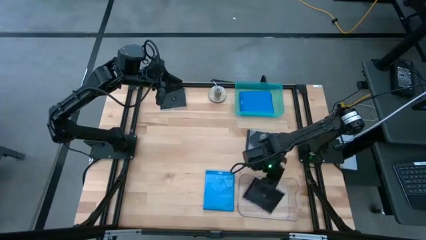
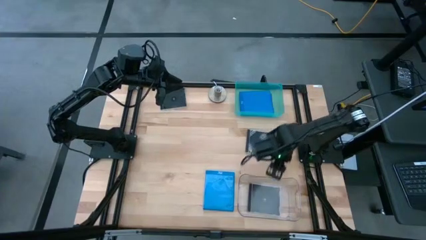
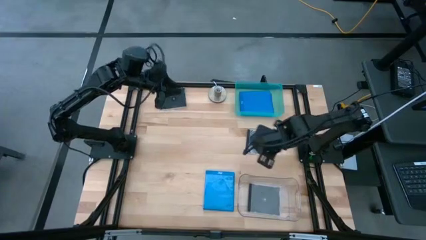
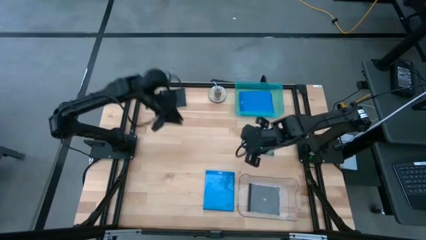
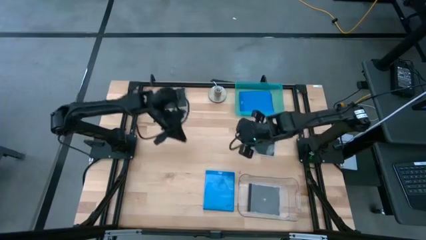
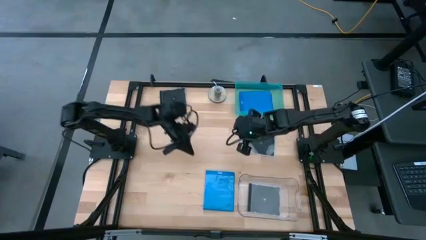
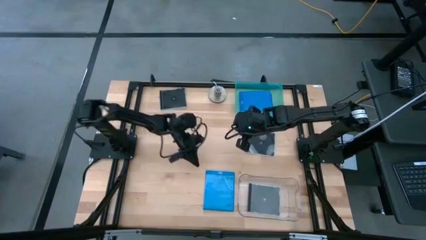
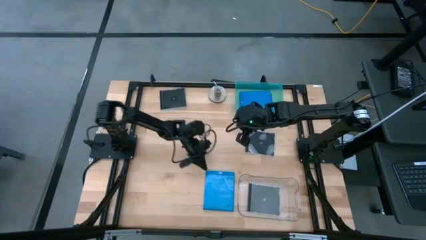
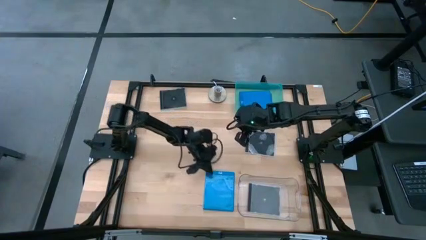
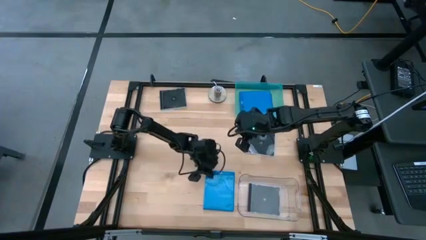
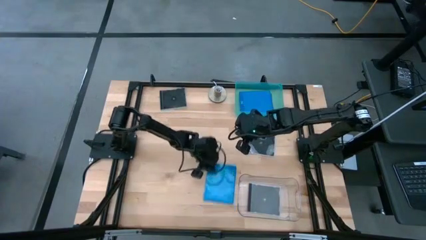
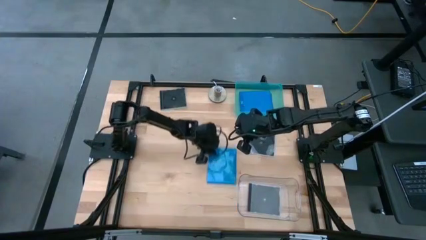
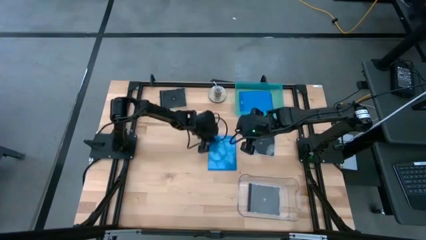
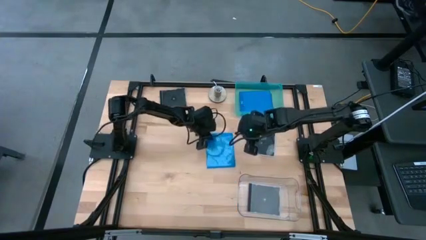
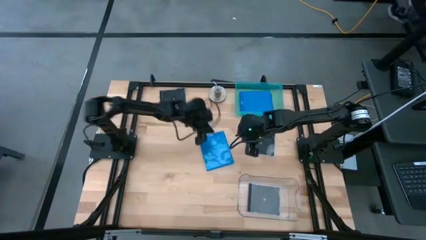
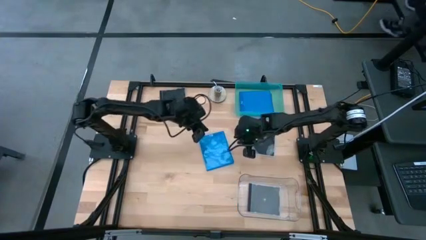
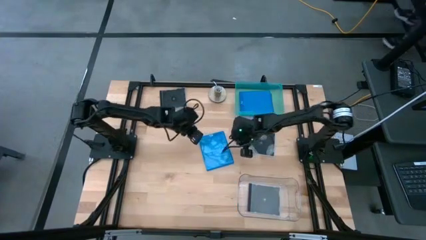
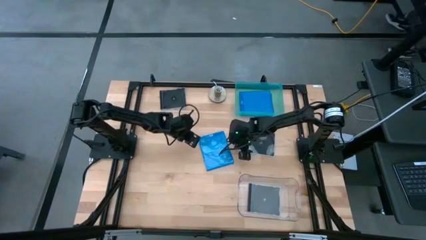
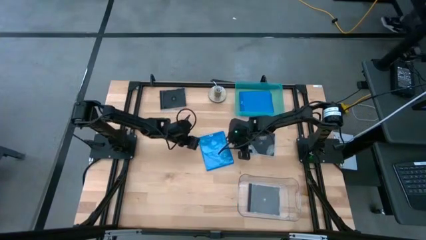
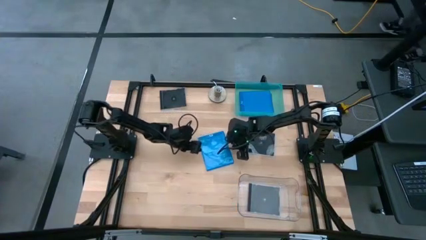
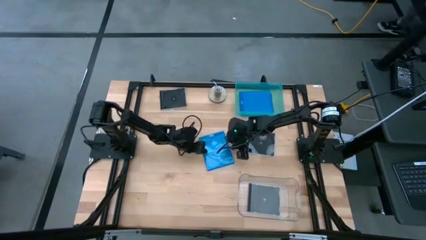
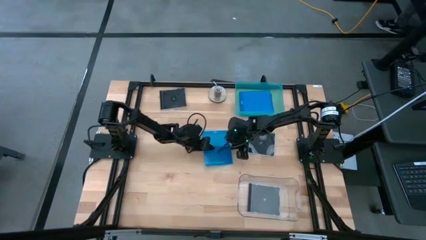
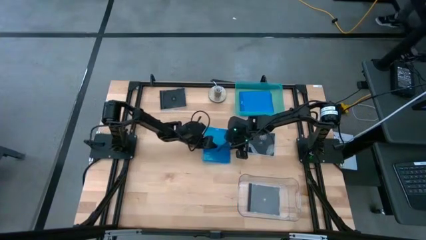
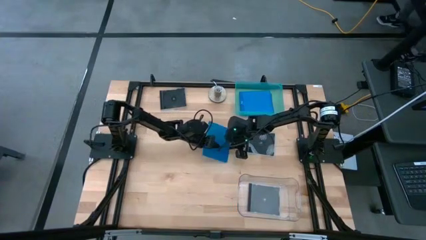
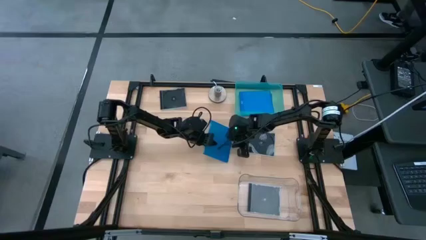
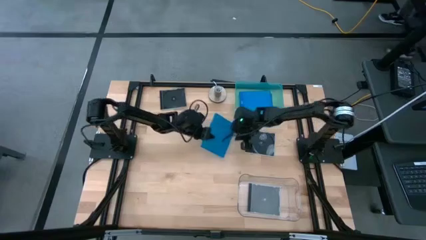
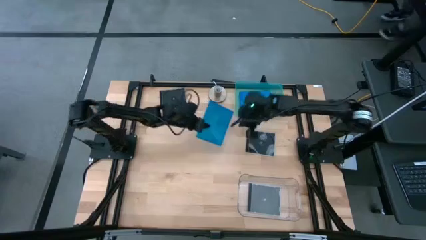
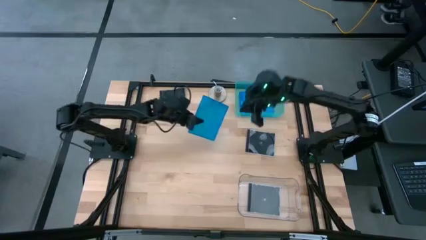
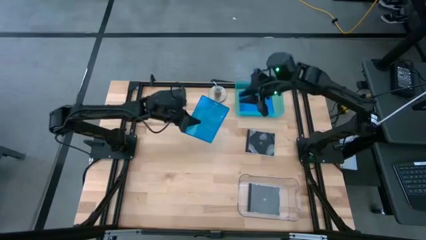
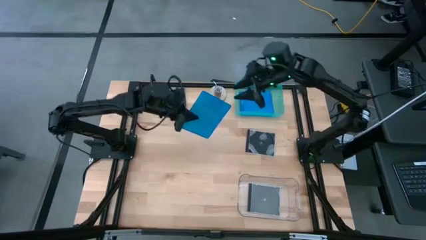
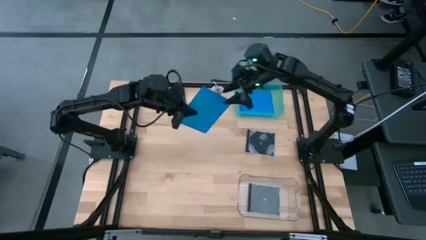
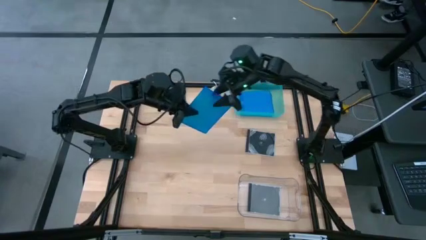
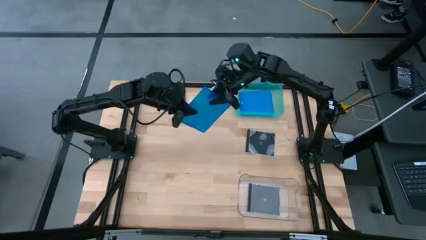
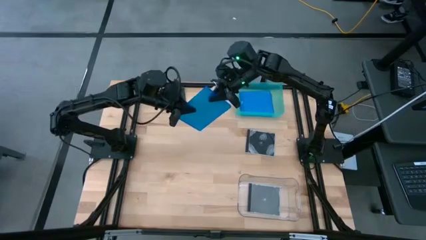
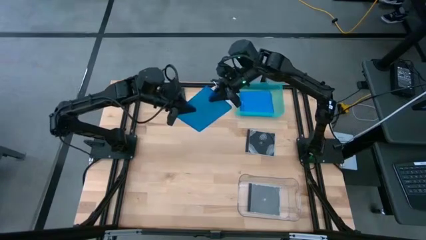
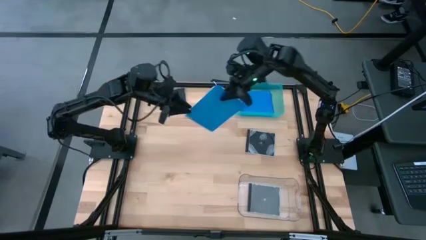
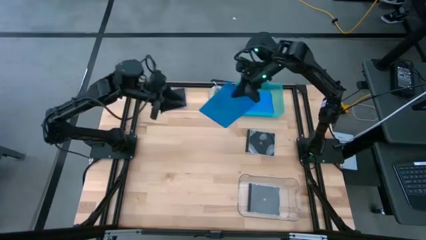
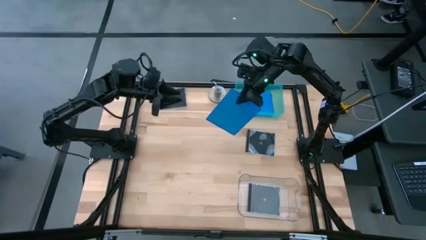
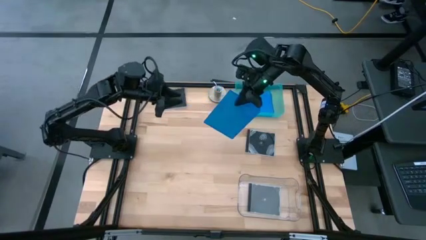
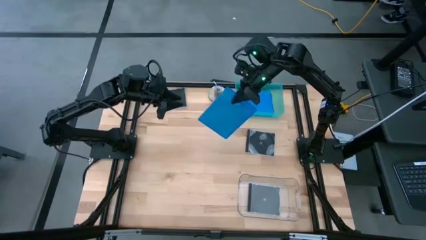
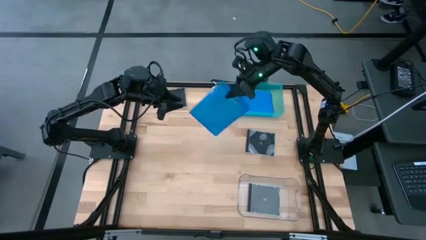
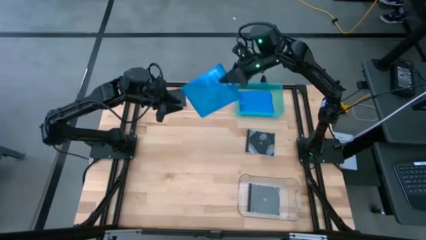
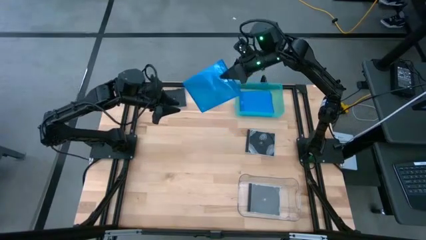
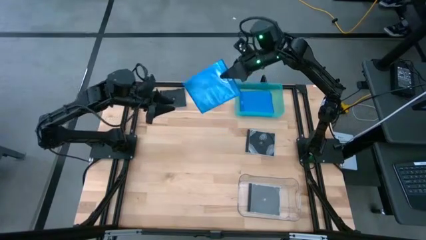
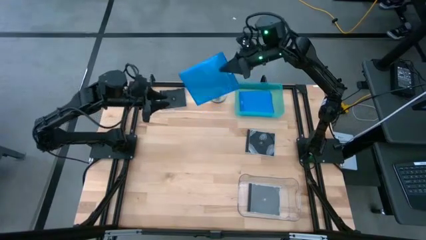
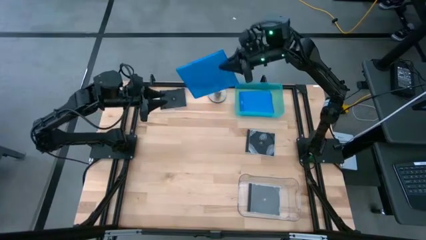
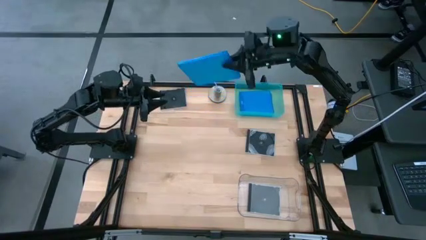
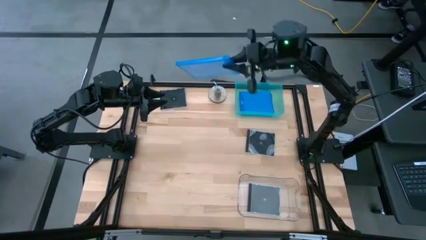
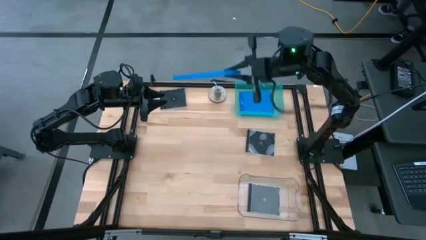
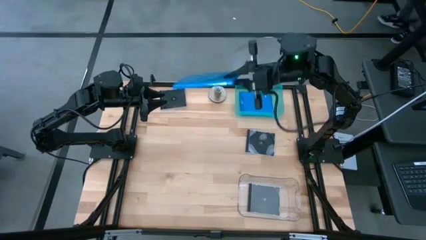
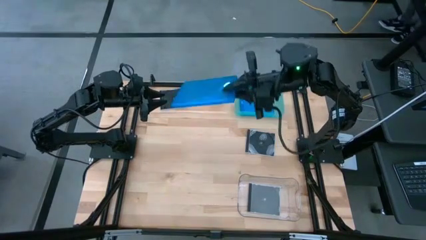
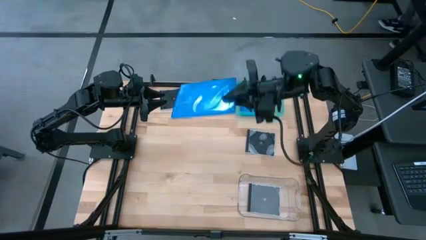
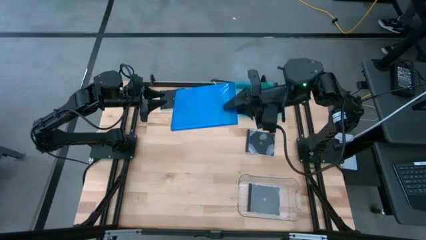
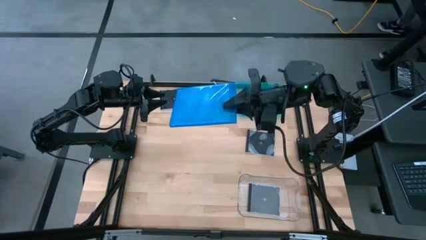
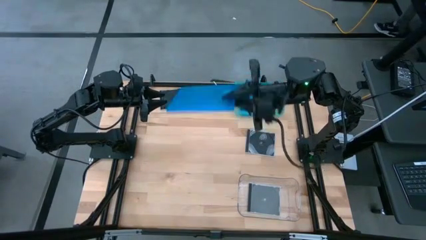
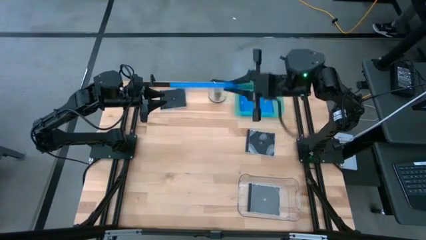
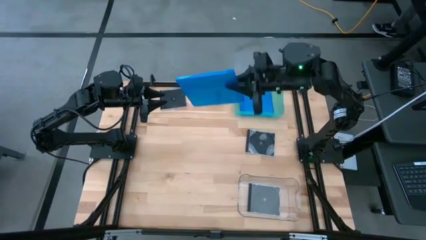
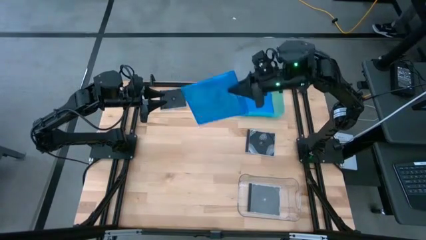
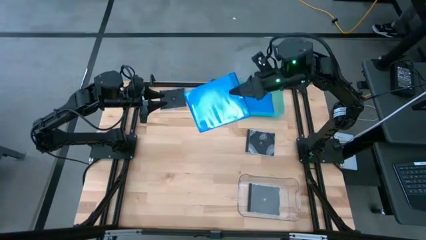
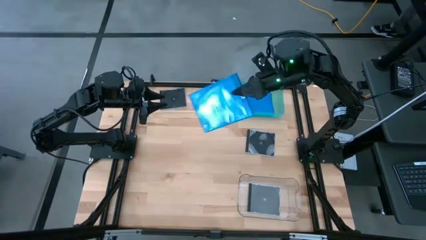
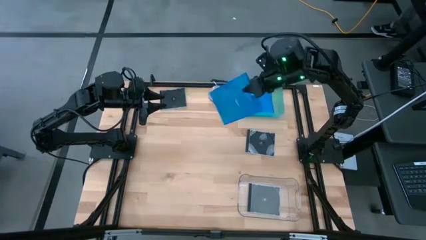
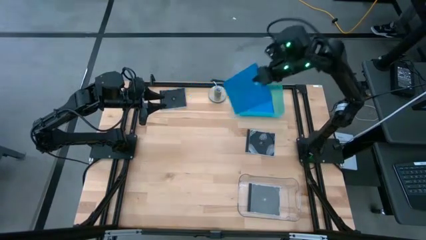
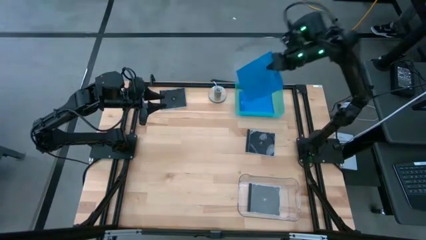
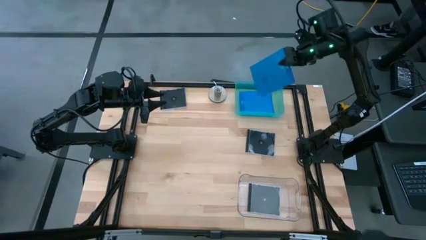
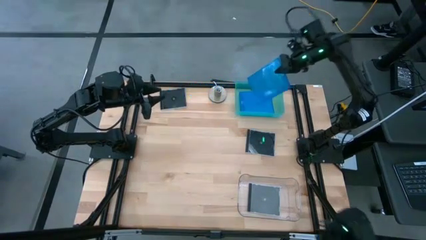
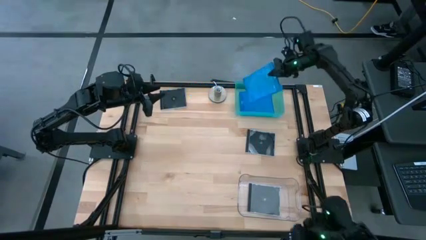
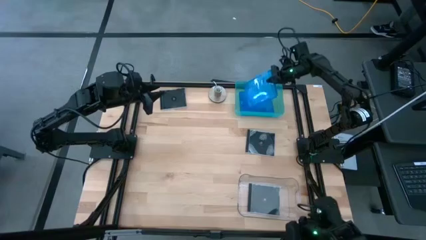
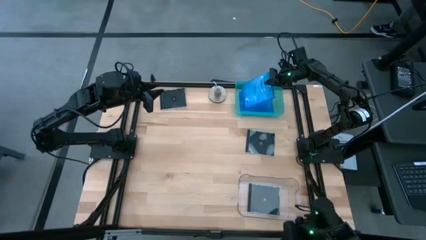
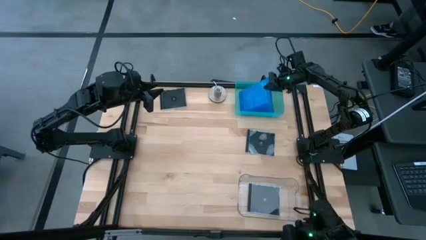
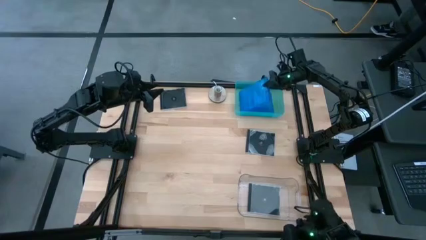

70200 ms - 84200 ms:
Task: Pick & place jewel cases by type
Put the blue CD case into the blue bin
